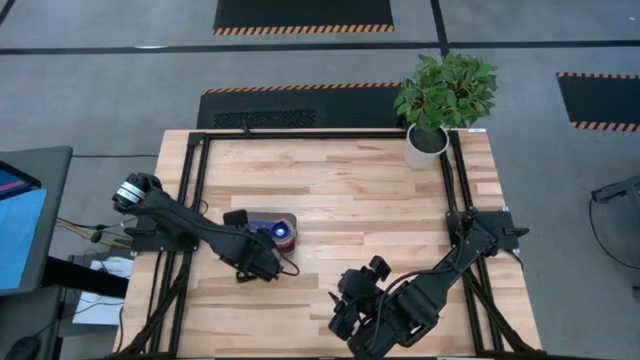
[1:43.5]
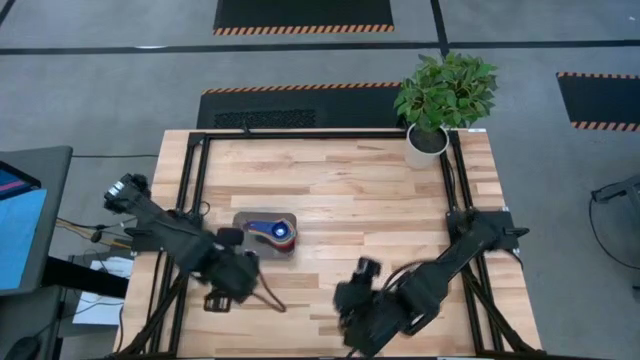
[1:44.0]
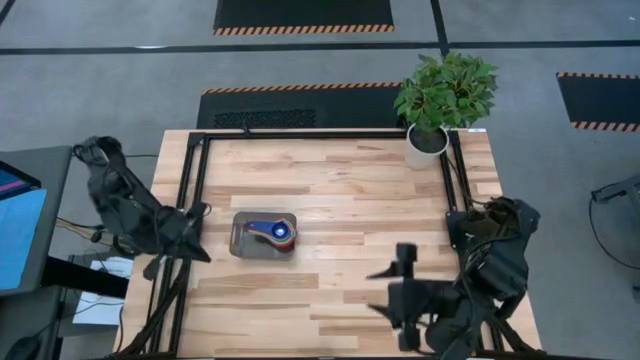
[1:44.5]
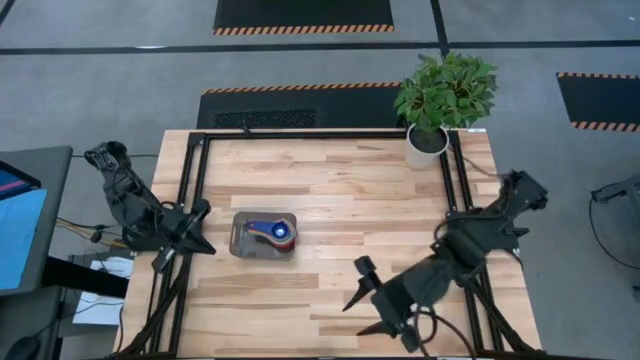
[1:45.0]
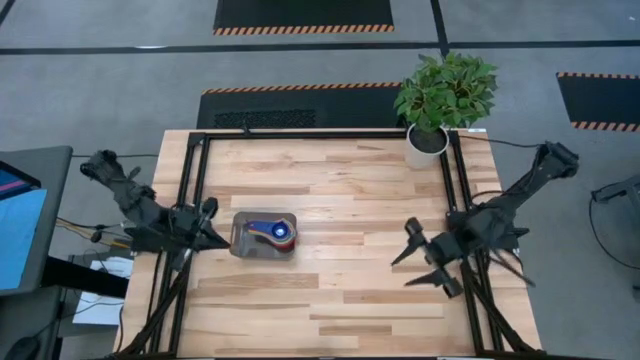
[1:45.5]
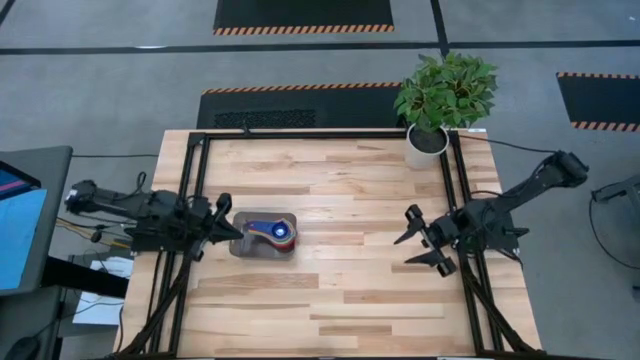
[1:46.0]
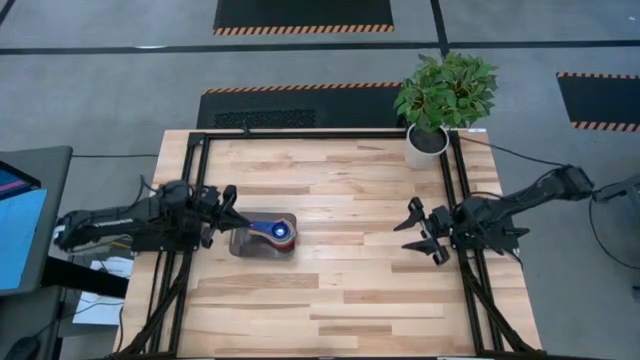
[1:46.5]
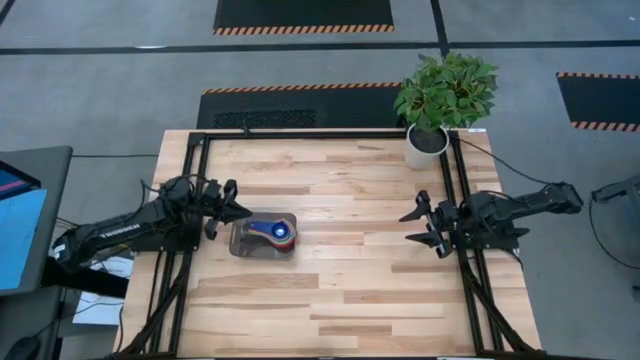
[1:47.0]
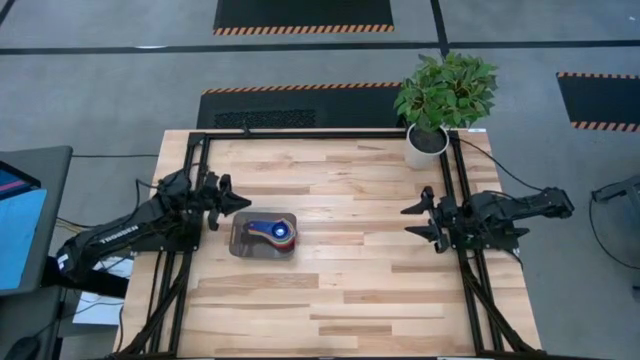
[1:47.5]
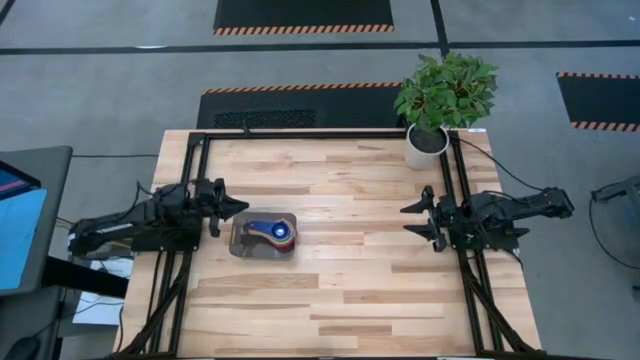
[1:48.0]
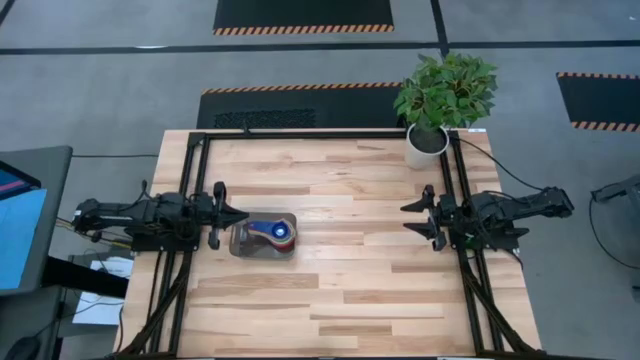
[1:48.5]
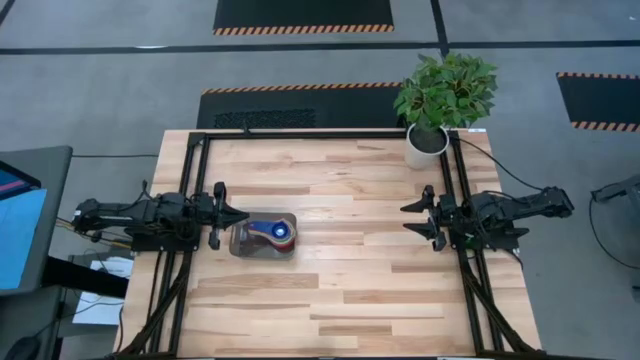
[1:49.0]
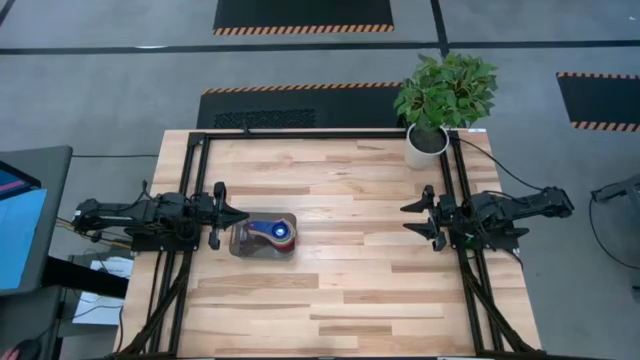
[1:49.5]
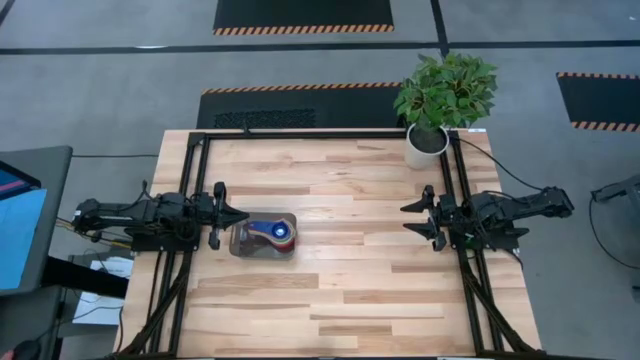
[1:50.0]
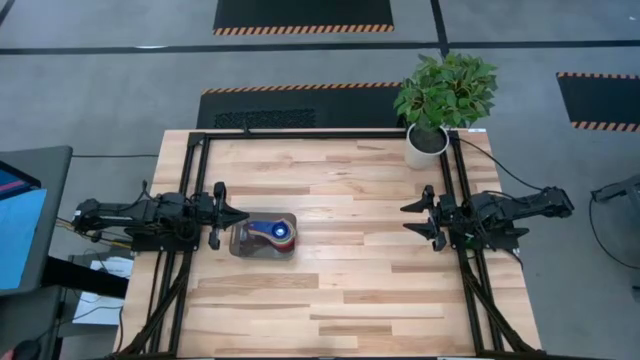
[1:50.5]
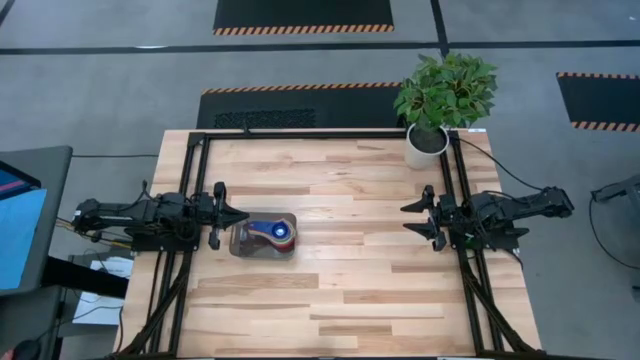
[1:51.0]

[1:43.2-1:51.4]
Task: Nest measuring cups in basket
Return to Home Position

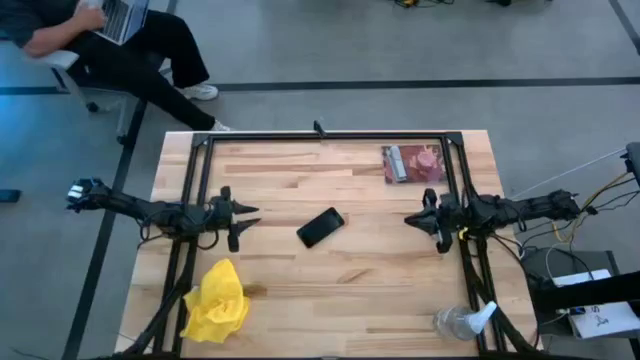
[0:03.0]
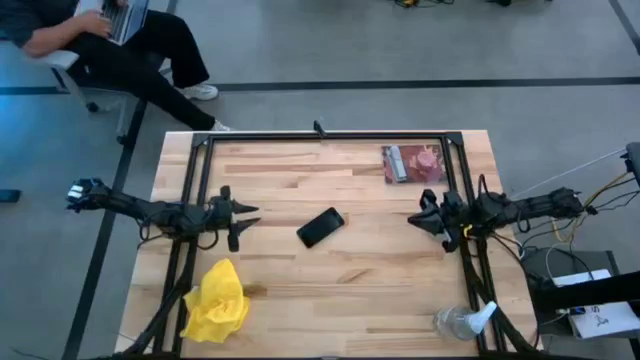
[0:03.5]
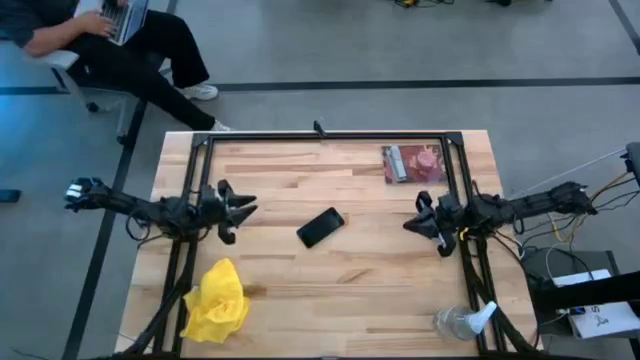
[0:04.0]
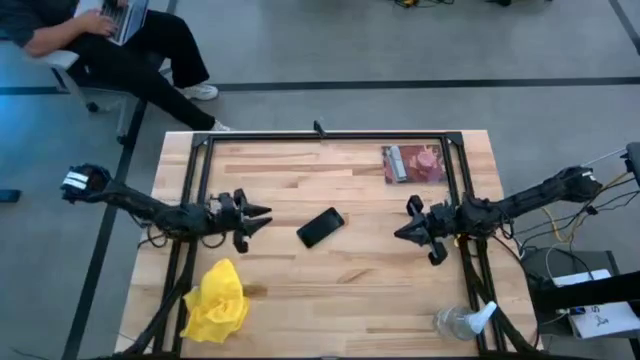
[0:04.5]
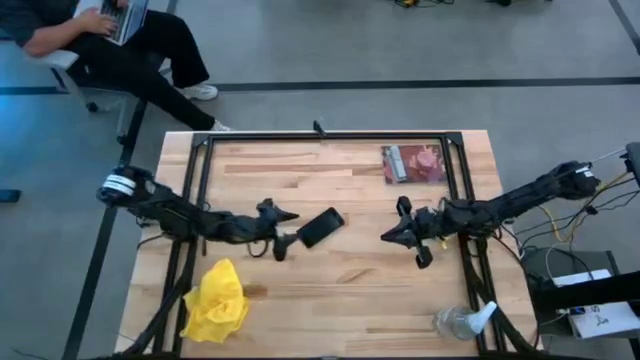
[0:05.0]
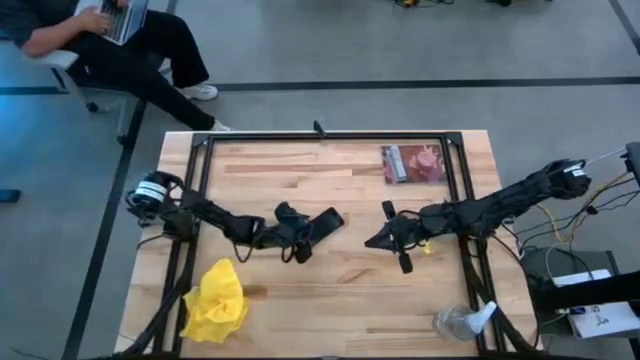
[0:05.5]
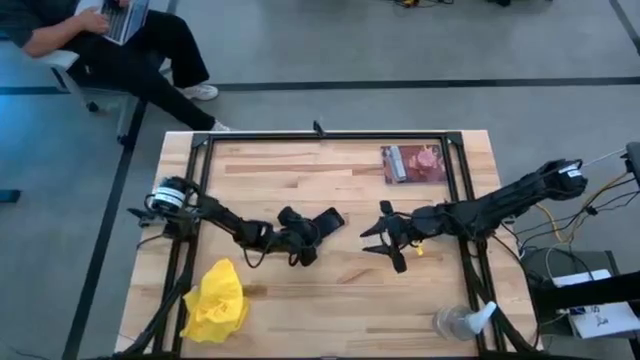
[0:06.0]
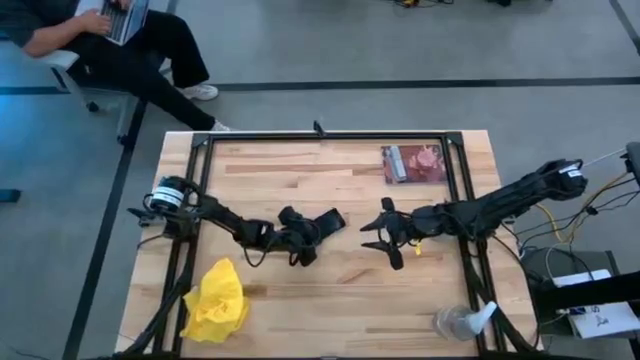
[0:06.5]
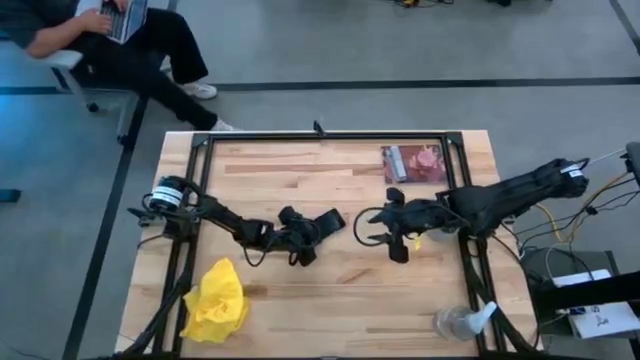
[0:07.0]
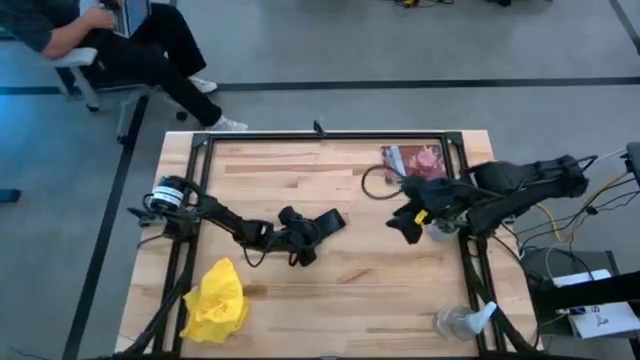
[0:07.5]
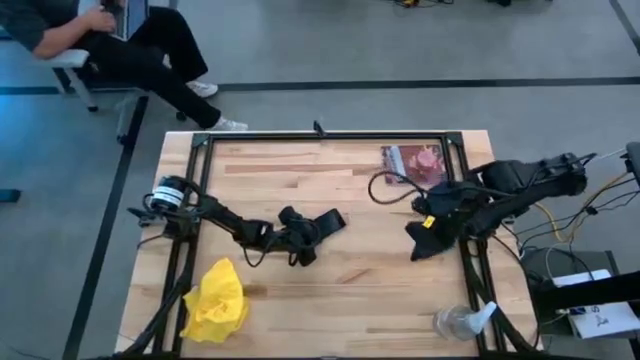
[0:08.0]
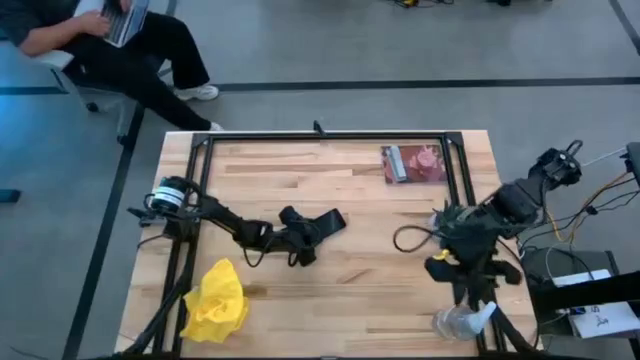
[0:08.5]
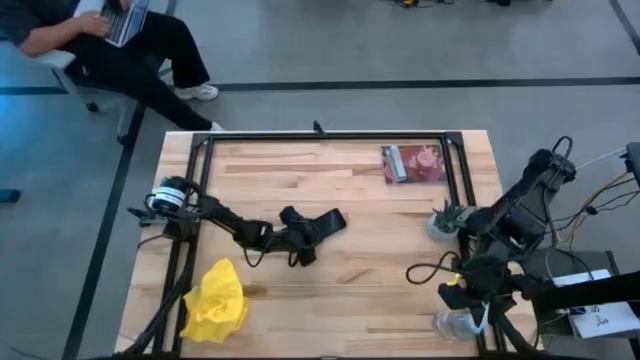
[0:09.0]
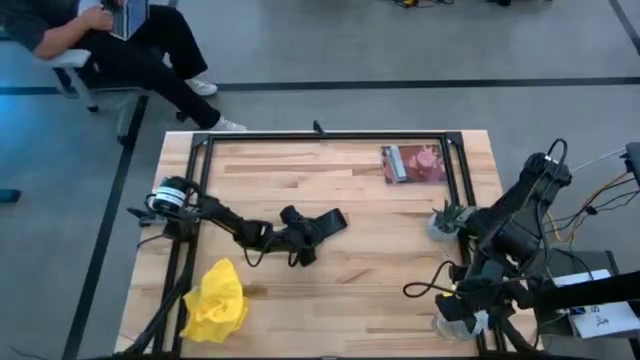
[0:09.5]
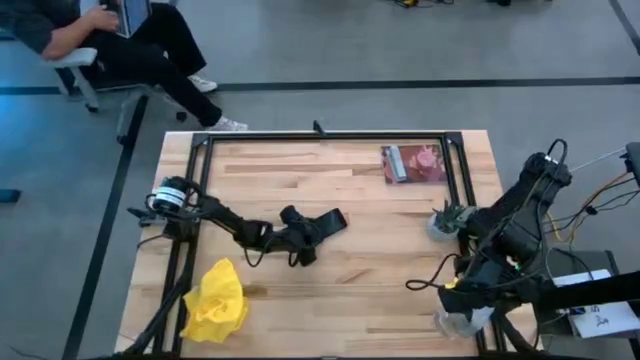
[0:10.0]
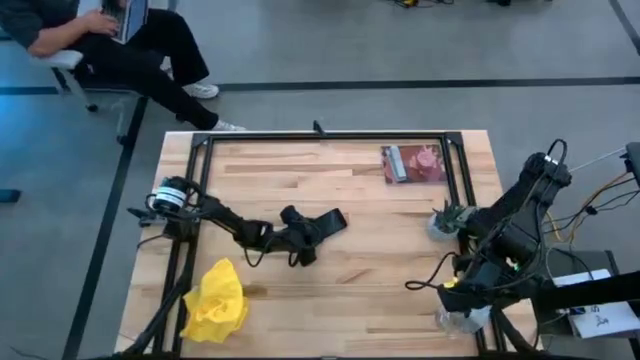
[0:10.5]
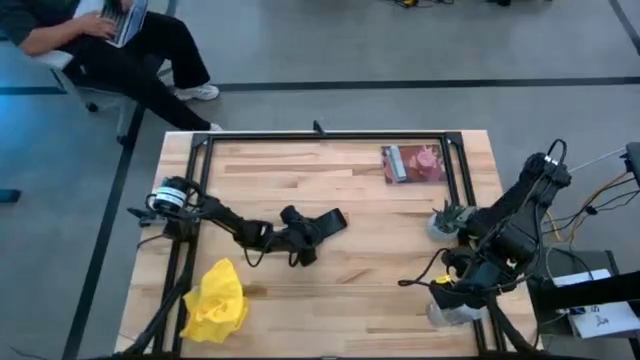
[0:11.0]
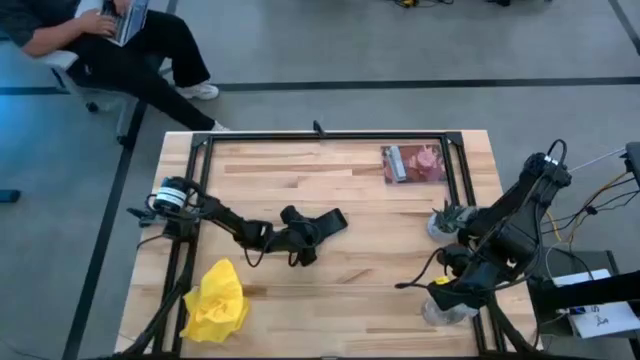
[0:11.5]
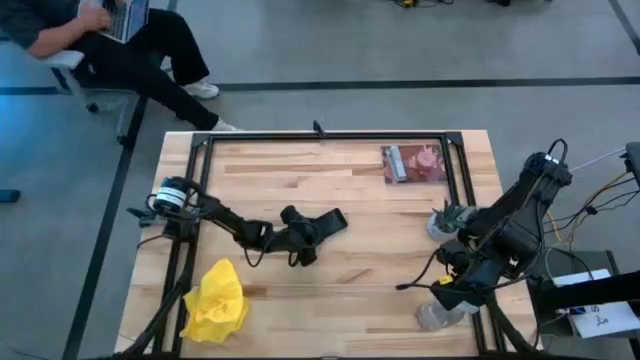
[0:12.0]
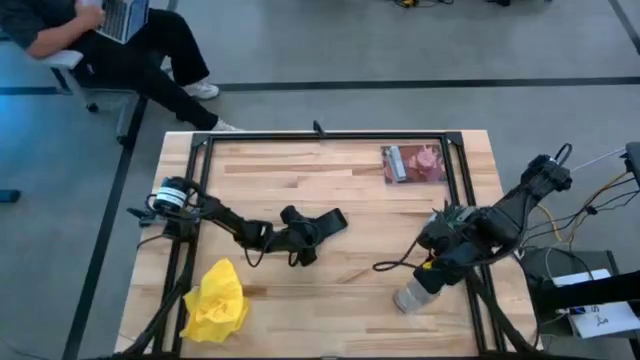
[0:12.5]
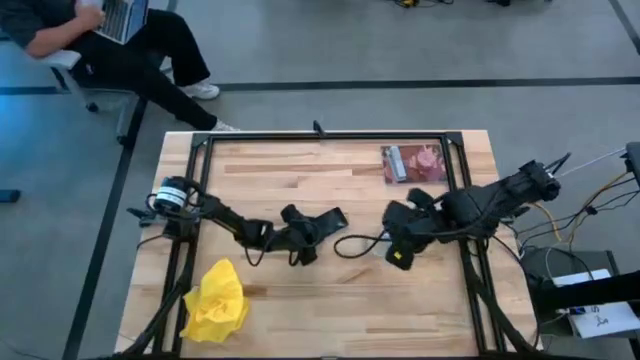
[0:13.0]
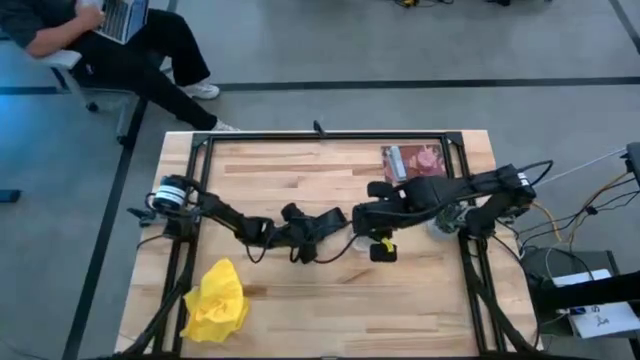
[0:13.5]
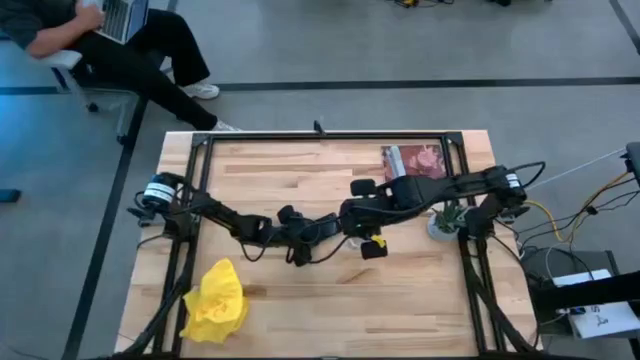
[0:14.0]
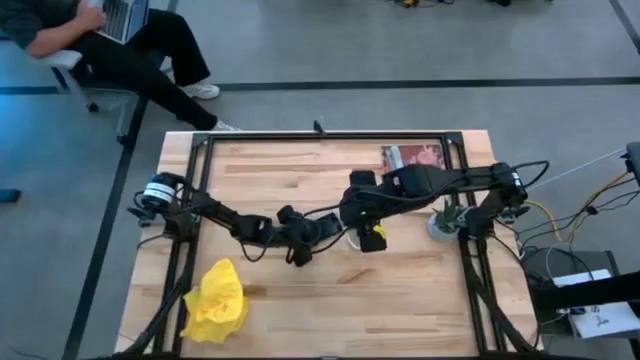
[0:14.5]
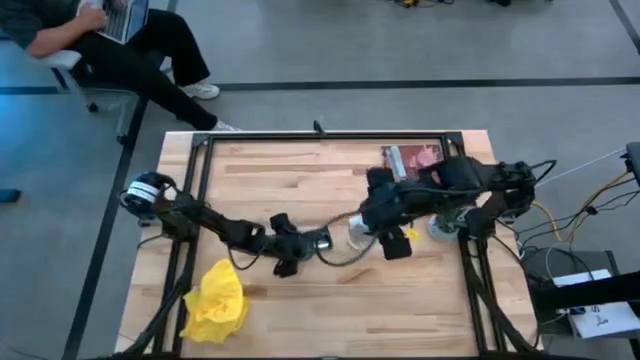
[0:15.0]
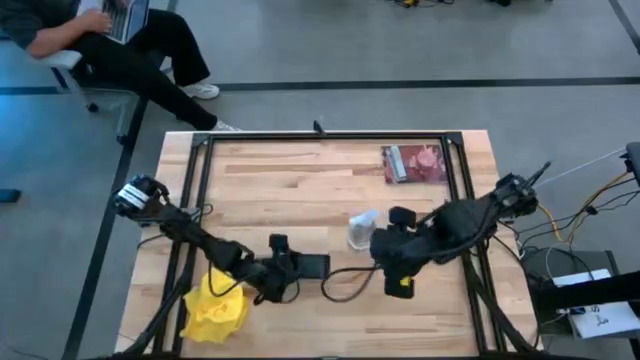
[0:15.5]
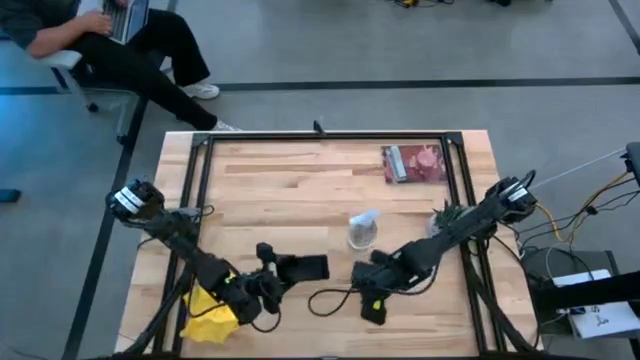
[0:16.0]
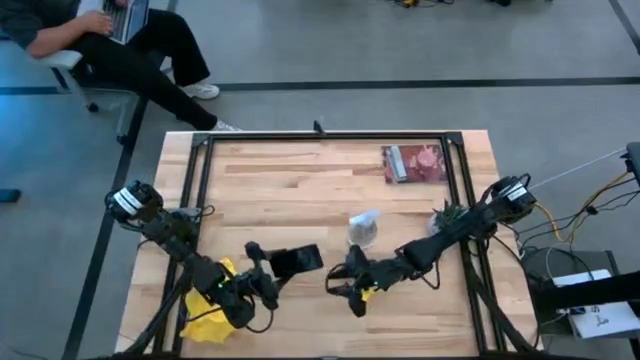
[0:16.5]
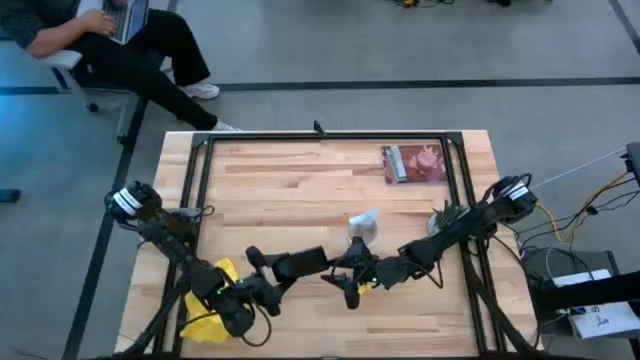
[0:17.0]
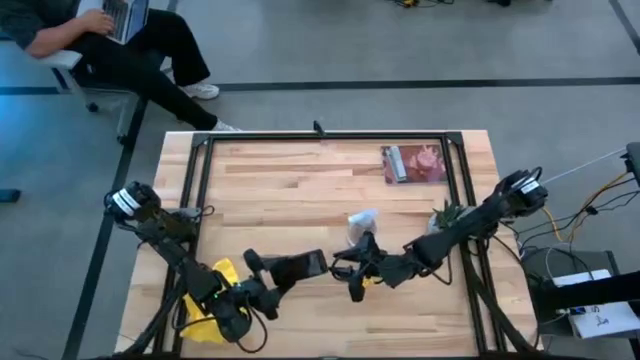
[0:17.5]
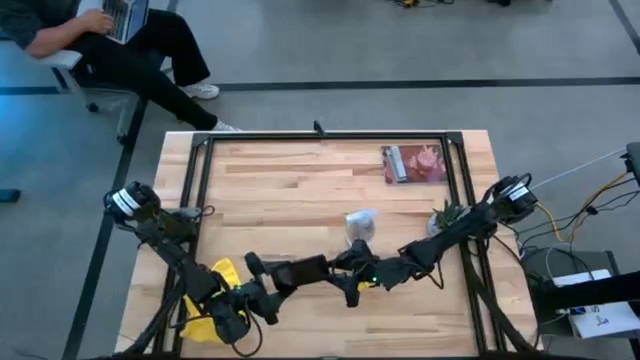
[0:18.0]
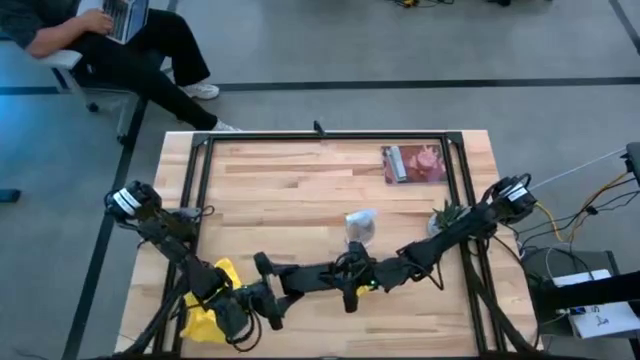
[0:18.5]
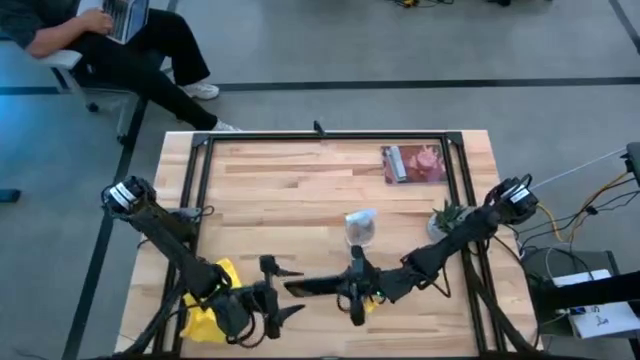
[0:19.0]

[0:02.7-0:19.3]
Task: Apply microfiber cloth
Spray the black cellphone with the spray bottle
